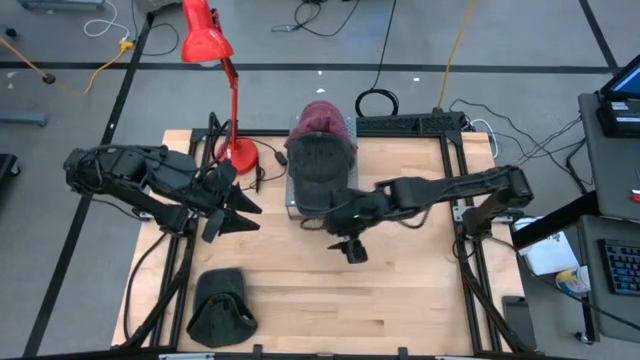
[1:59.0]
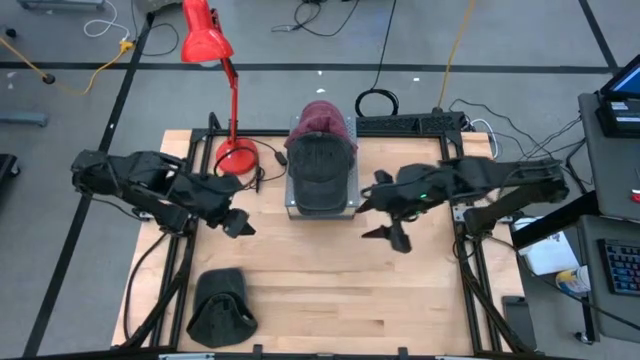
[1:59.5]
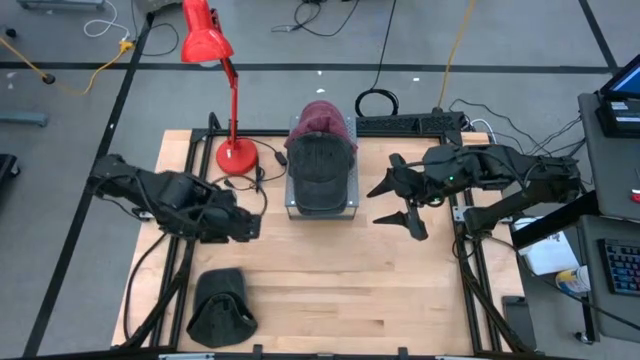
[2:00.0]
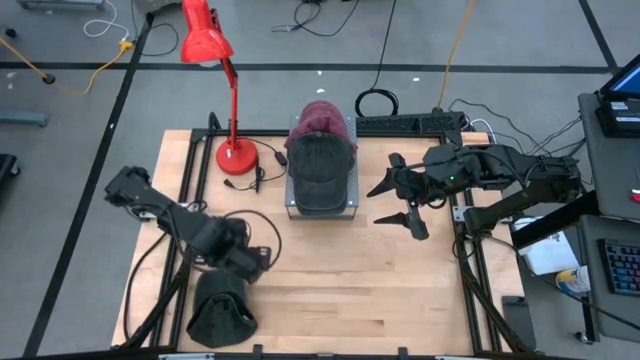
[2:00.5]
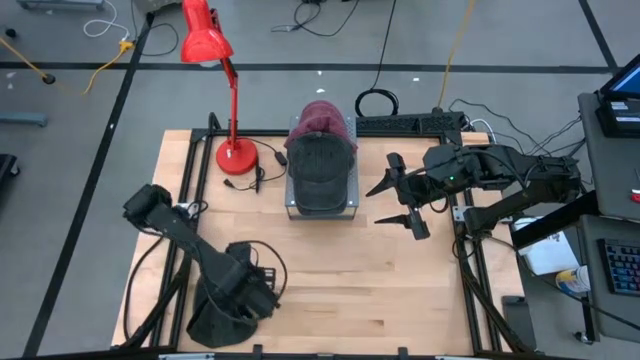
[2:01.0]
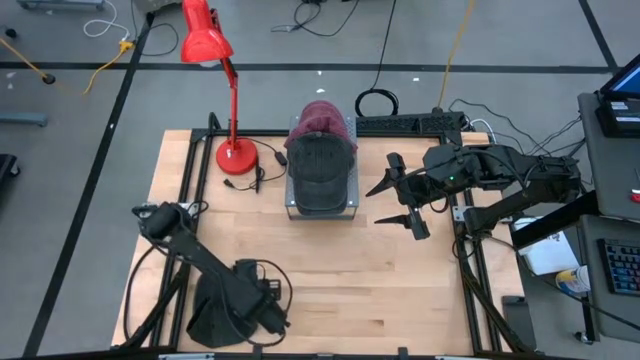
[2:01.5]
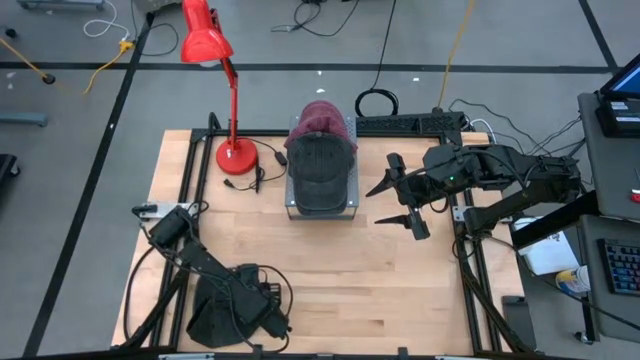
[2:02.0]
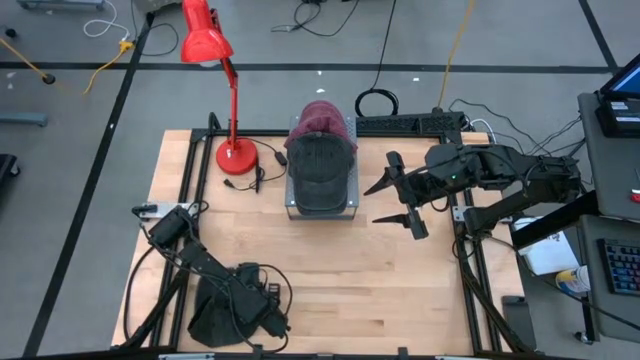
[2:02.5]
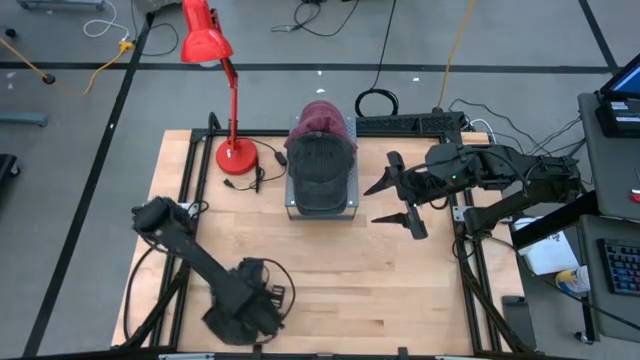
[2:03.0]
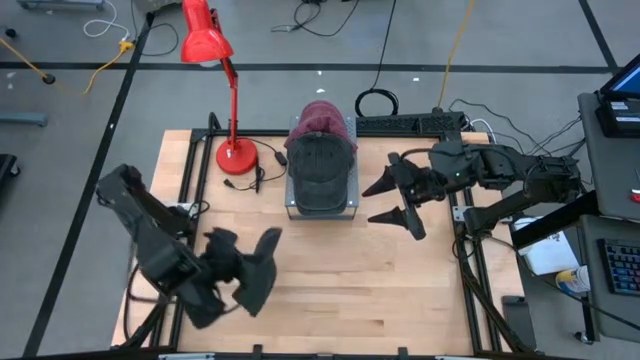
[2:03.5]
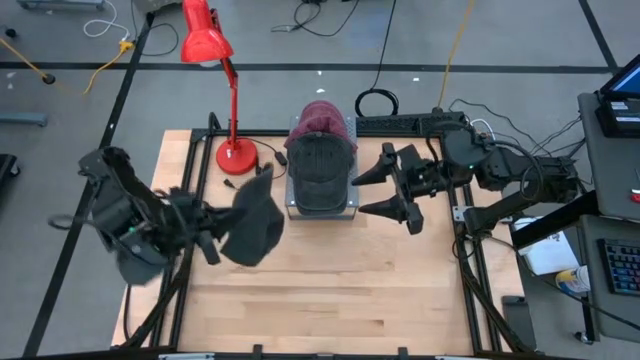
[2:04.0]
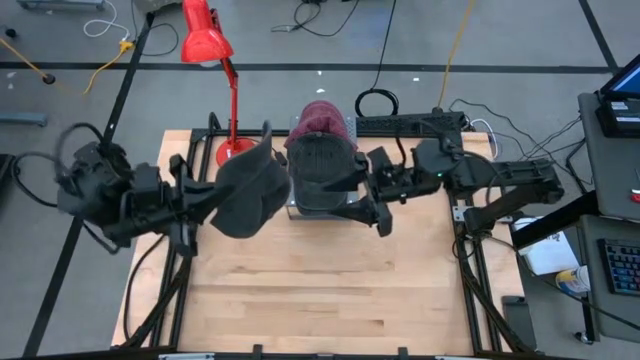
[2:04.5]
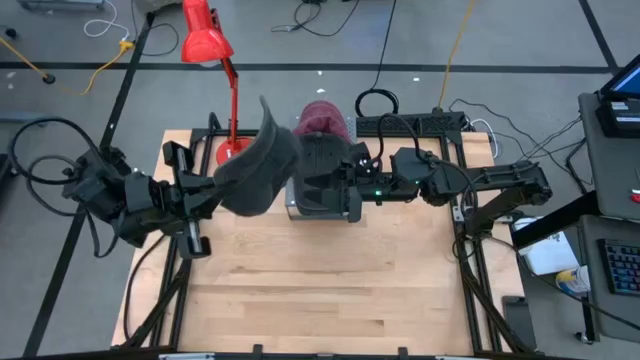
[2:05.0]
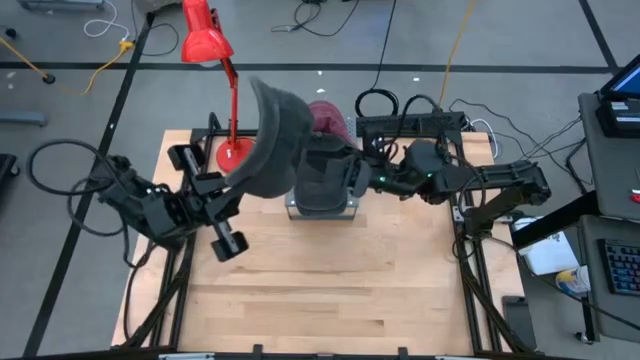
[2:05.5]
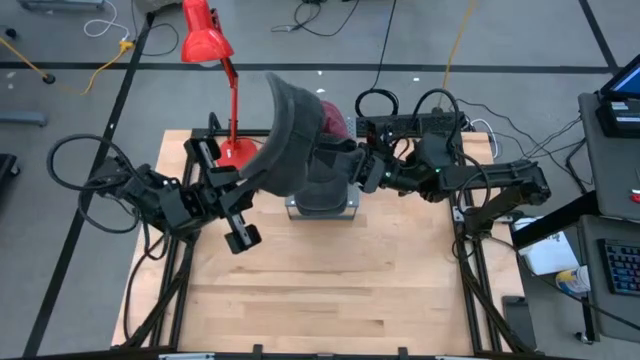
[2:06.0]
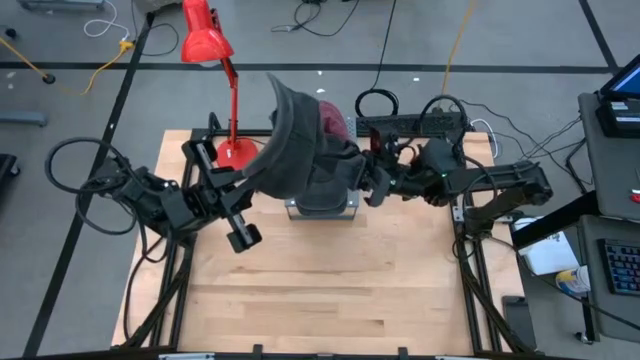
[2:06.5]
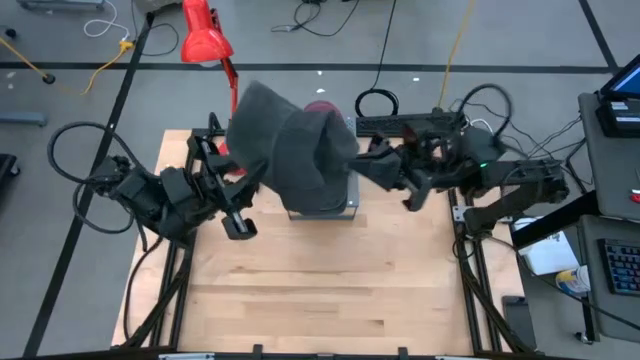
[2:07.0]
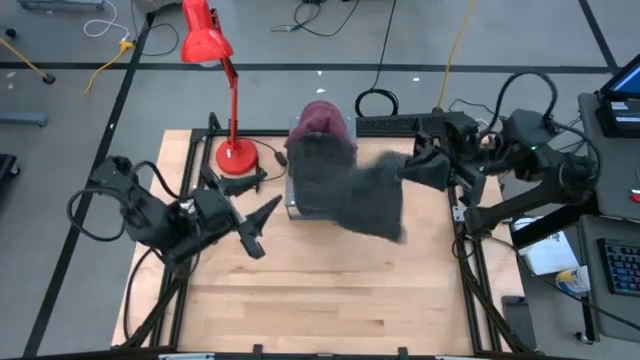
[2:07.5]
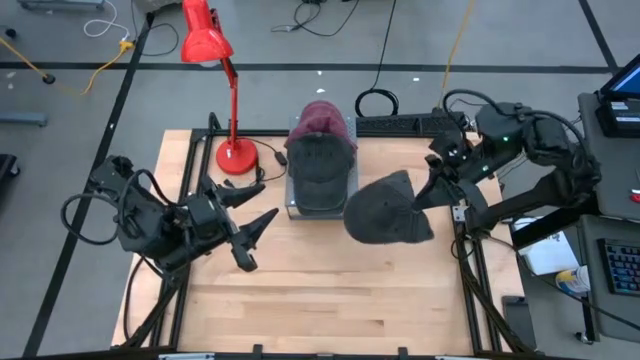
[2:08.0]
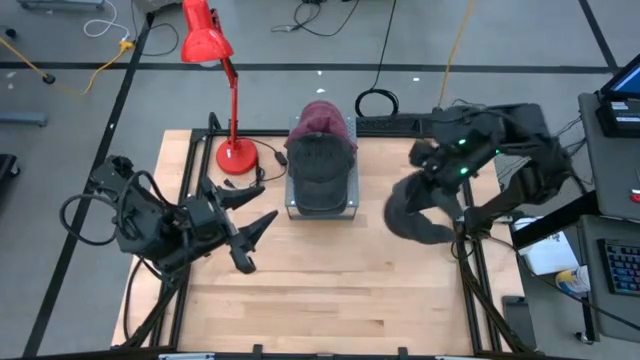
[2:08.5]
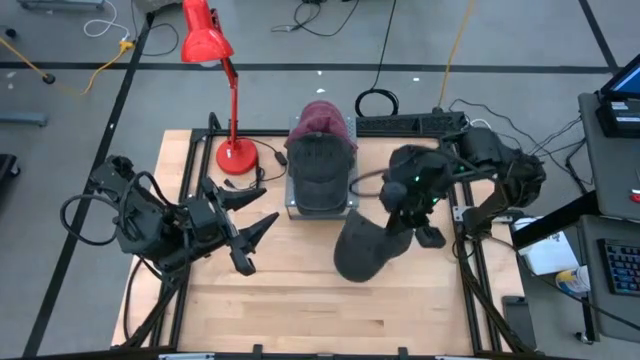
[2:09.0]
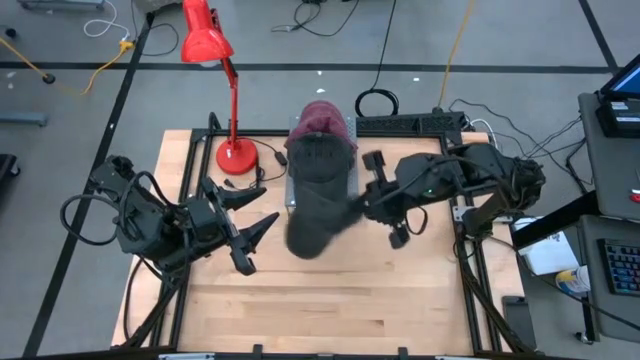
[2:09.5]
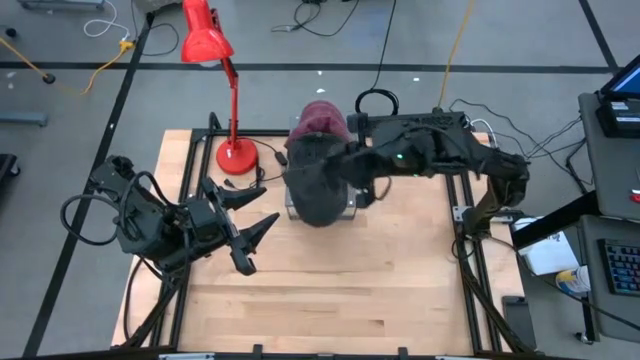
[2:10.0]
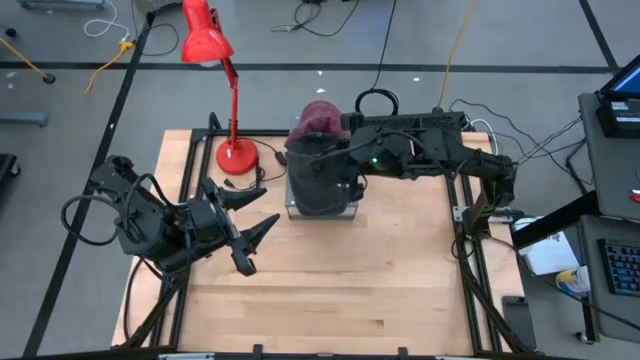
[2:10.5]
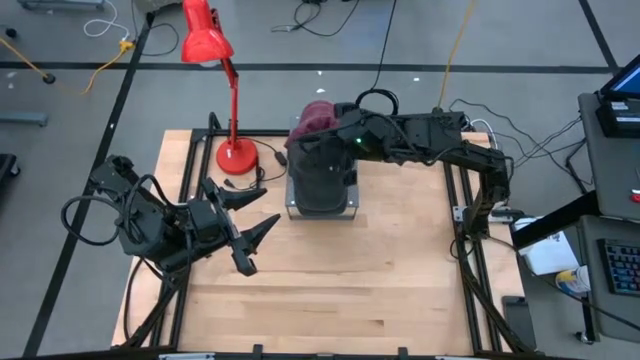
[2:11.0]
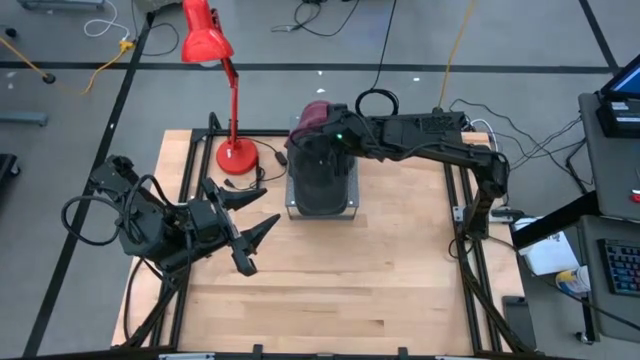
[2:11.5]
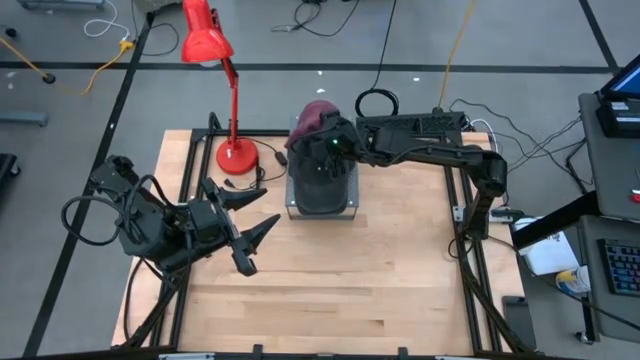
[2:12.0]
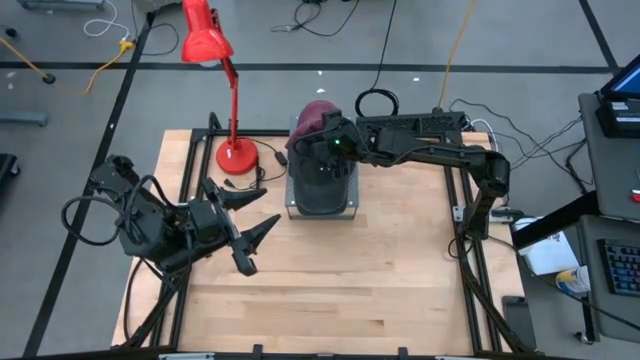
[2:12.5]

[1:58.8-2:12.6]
Task: Pick & Place hat
Stack the black cap on top of the black caps on the shelf

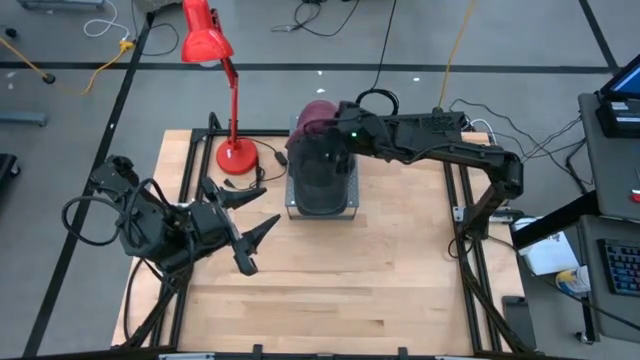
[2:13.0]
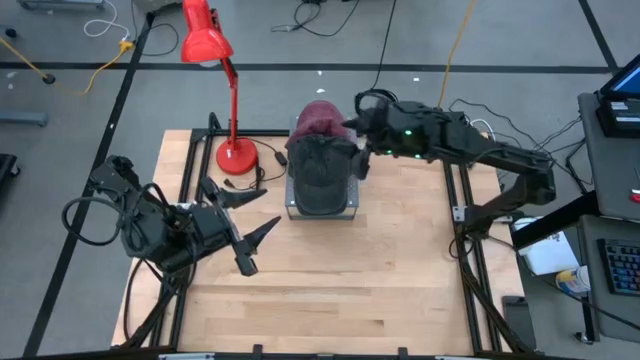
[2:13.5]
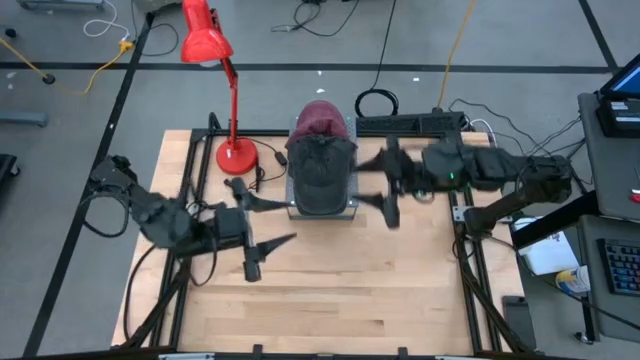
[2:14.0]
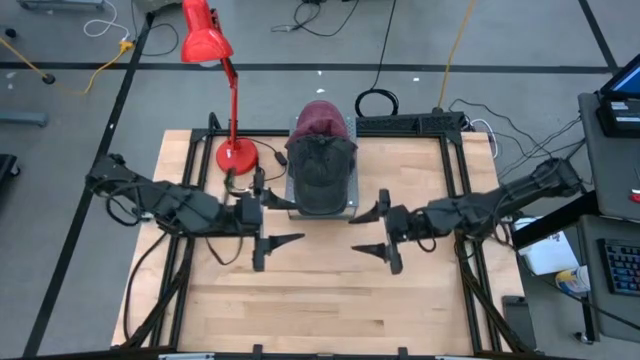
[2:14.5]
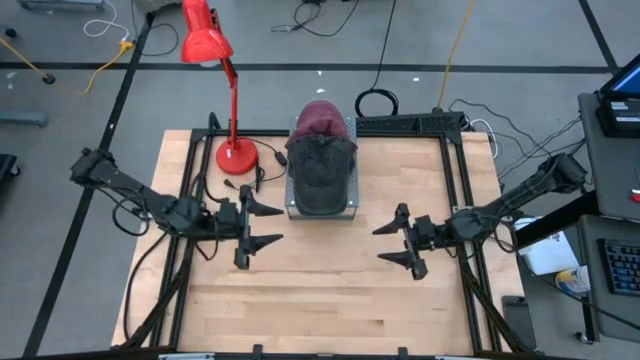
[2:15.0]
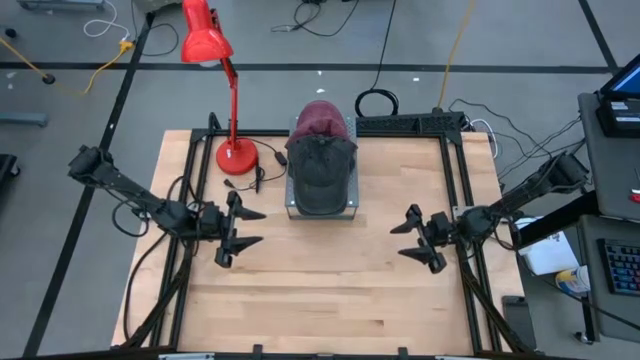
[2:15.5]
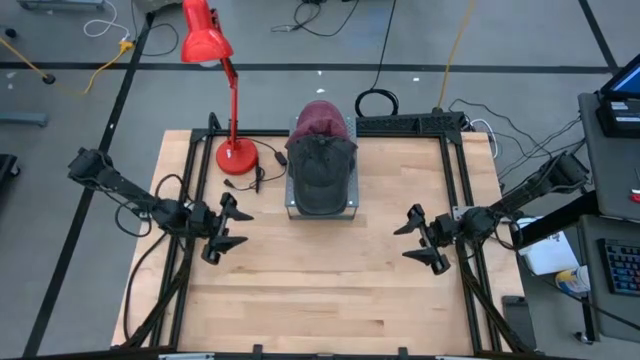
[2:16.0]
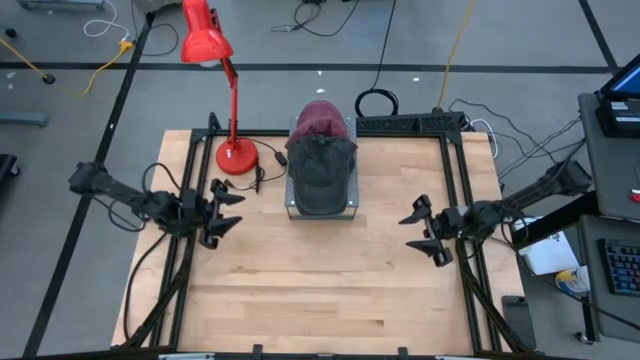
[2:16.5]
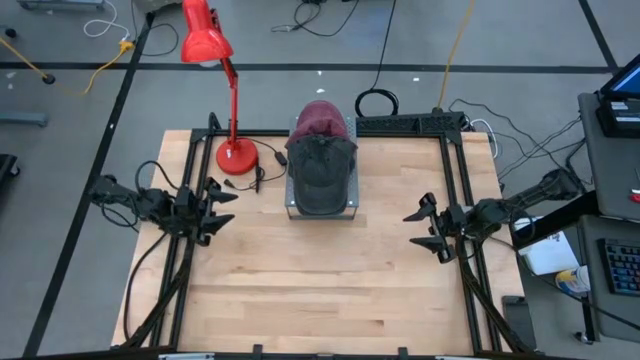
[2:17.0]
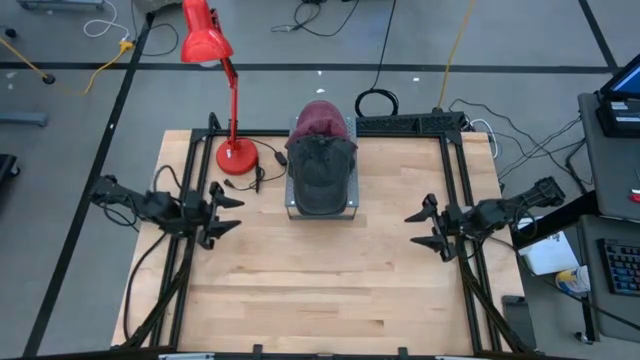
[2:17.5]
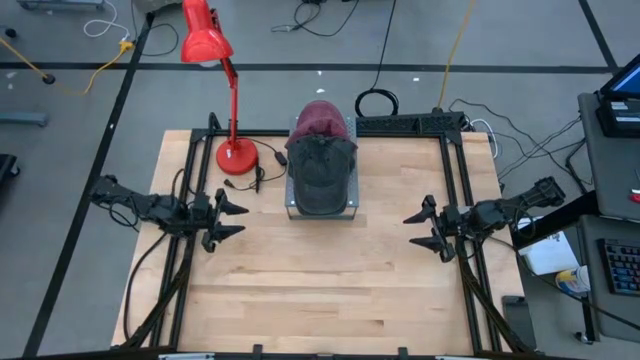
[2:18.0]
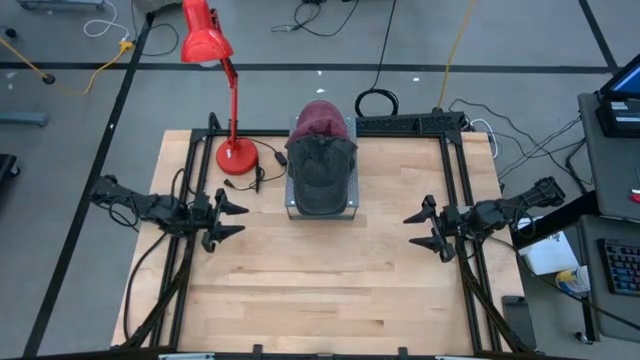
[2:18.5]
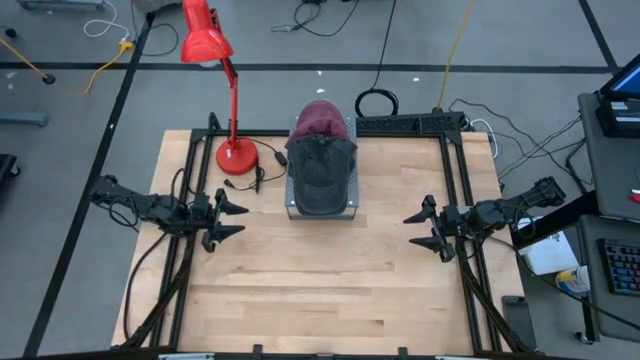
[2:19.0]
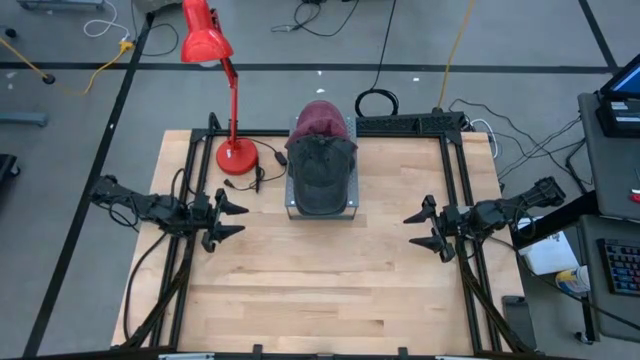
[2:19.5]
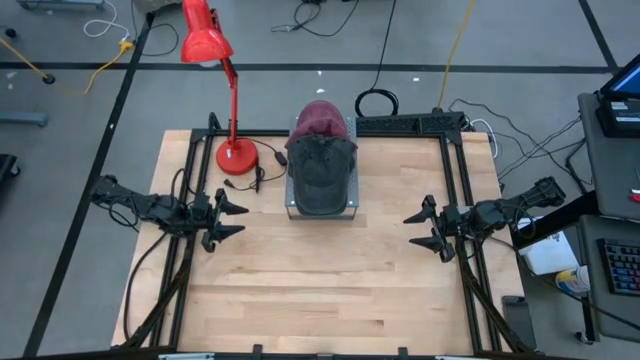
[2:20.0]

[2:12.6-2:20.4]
Return to Home Position

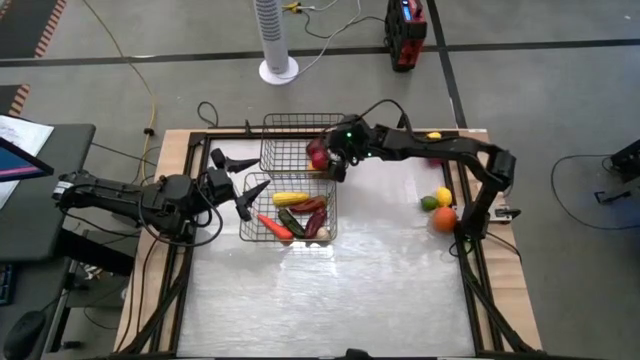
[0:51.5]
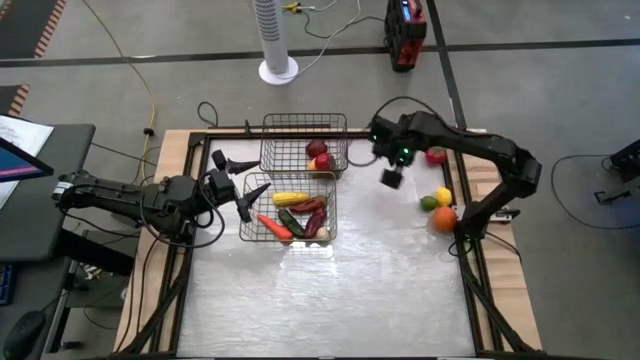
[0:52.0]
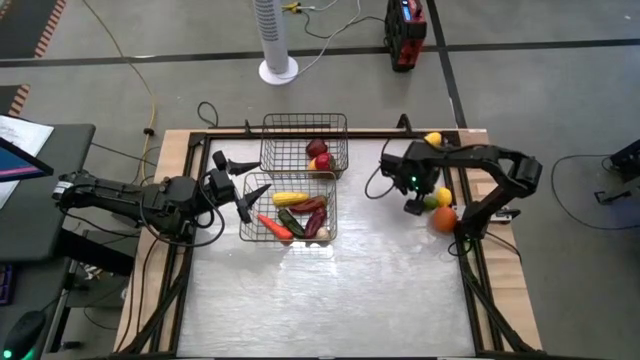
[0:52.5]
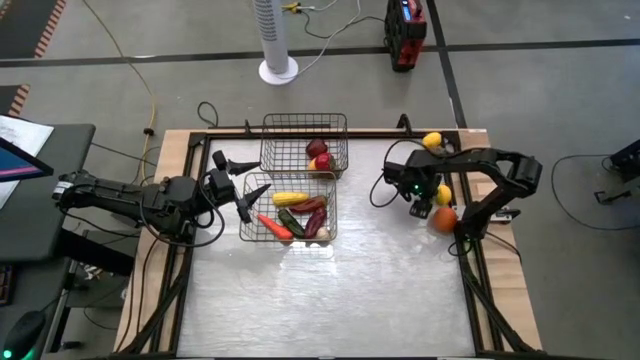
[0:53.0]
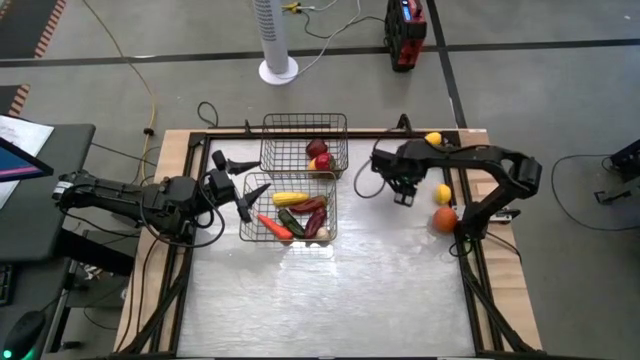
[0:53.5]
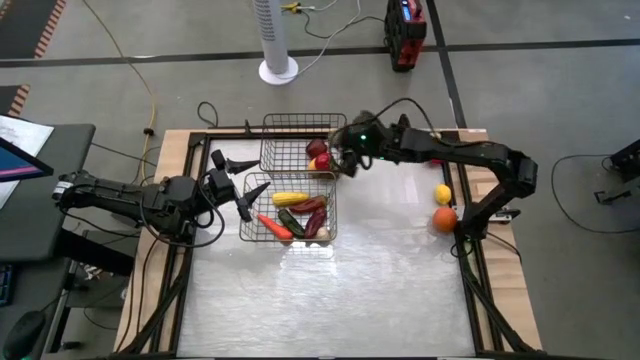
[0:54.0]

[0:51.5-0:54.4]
Task: Sort produce into baskets
Put the lime into the top wire basket
